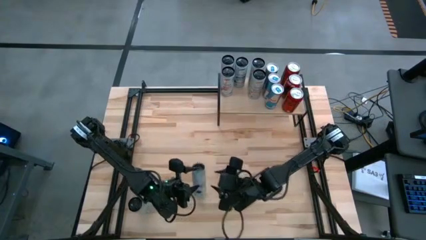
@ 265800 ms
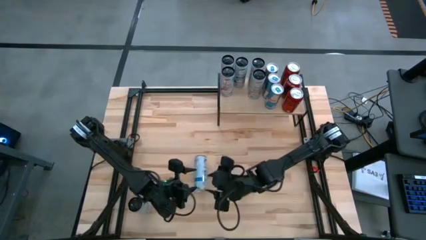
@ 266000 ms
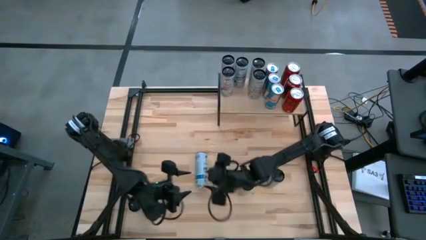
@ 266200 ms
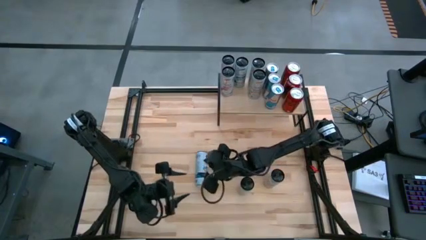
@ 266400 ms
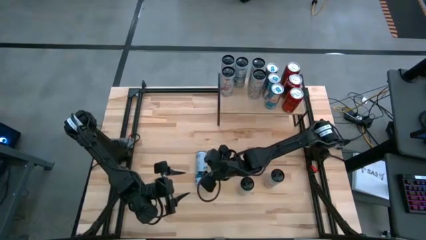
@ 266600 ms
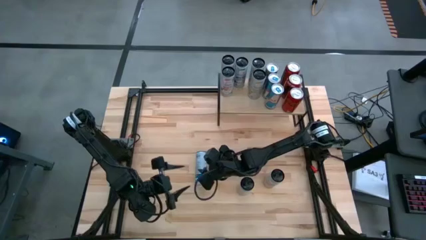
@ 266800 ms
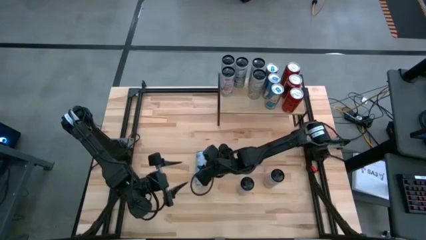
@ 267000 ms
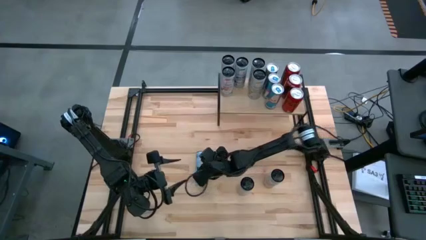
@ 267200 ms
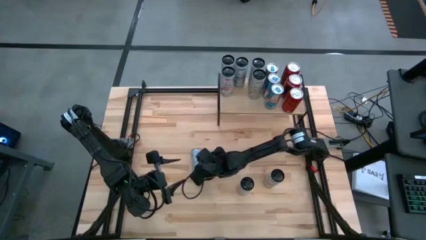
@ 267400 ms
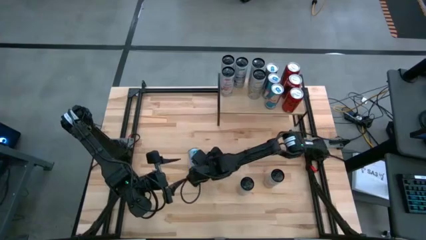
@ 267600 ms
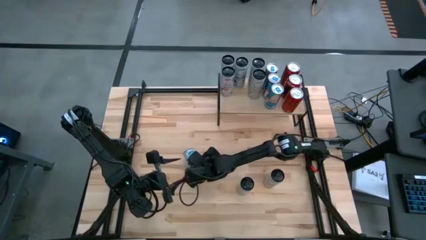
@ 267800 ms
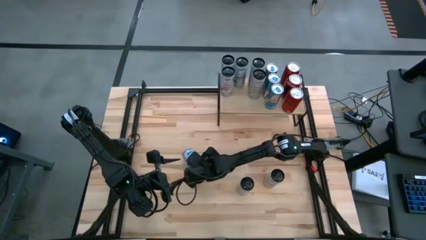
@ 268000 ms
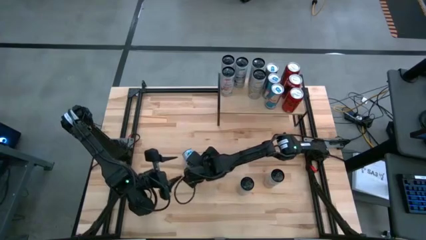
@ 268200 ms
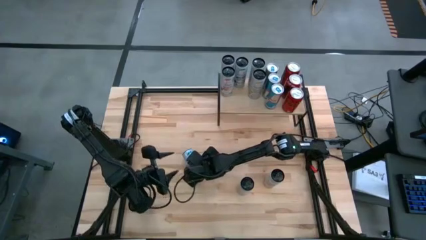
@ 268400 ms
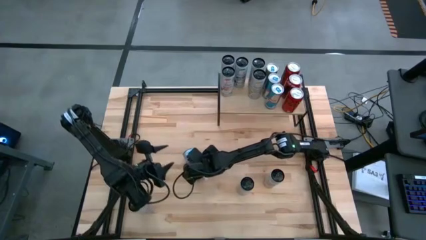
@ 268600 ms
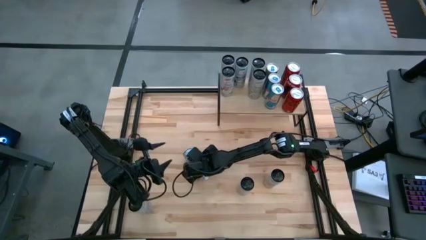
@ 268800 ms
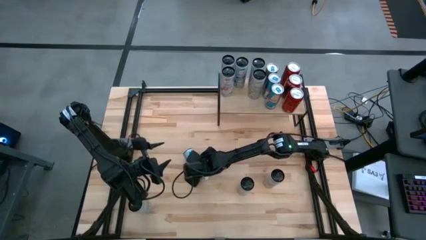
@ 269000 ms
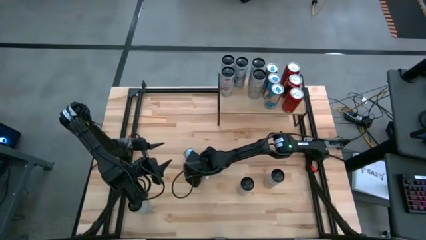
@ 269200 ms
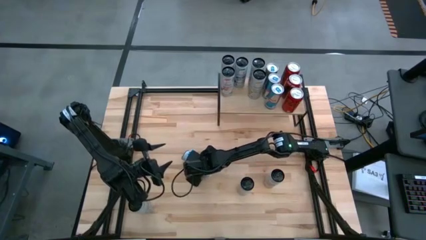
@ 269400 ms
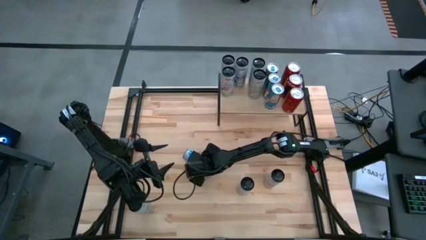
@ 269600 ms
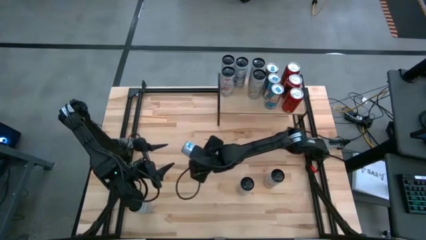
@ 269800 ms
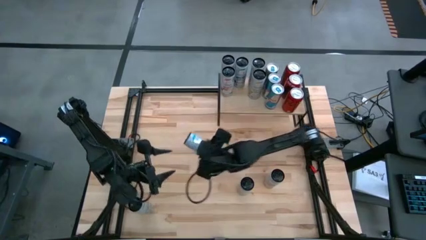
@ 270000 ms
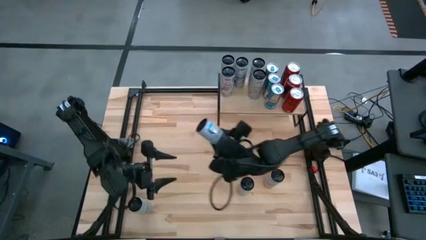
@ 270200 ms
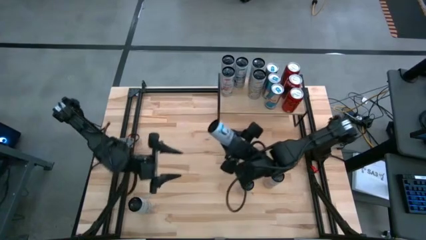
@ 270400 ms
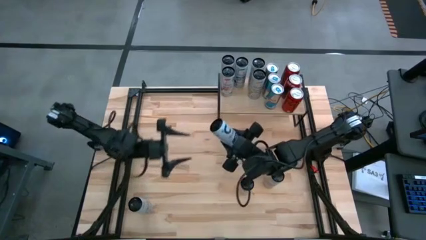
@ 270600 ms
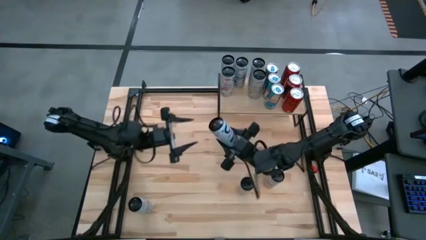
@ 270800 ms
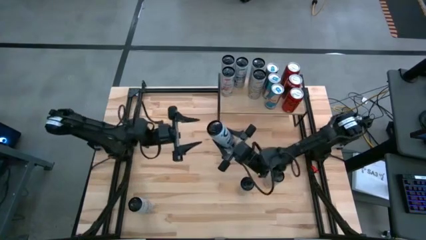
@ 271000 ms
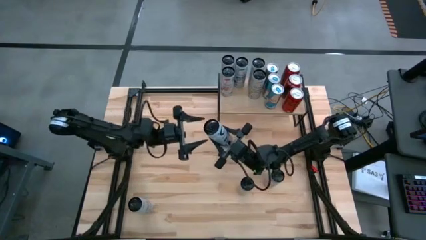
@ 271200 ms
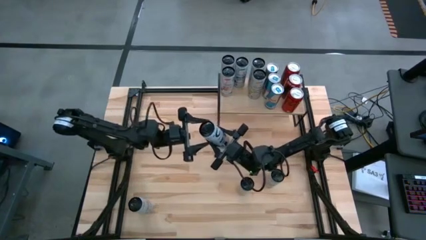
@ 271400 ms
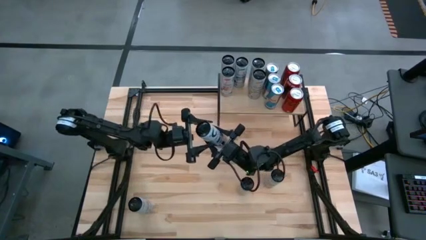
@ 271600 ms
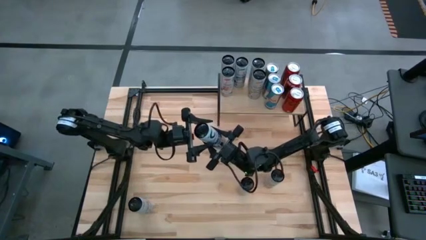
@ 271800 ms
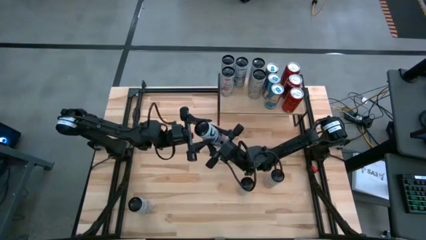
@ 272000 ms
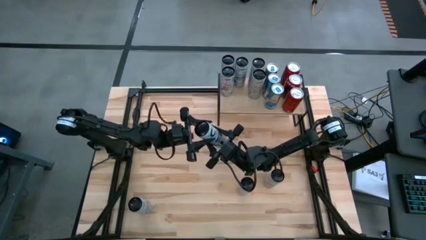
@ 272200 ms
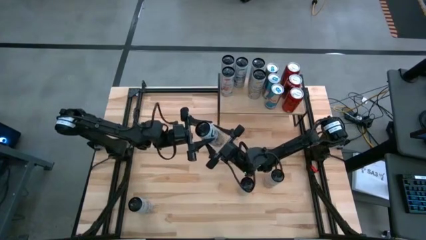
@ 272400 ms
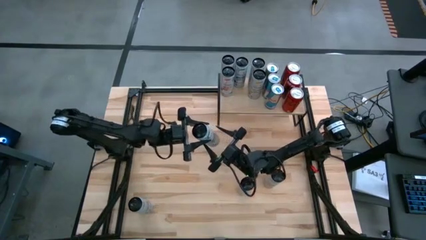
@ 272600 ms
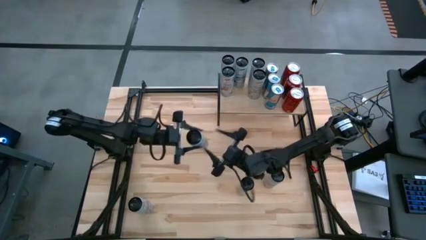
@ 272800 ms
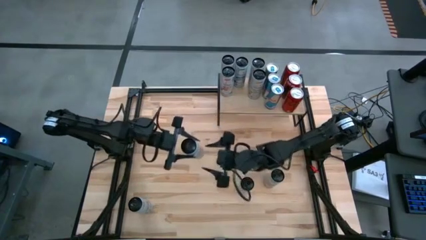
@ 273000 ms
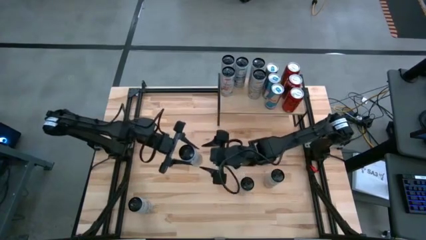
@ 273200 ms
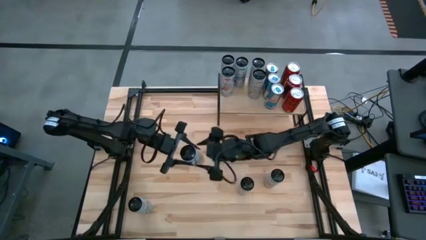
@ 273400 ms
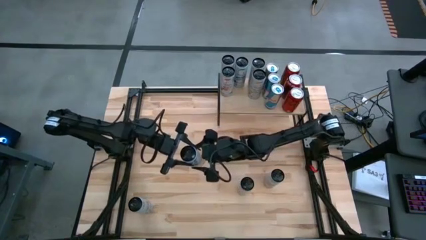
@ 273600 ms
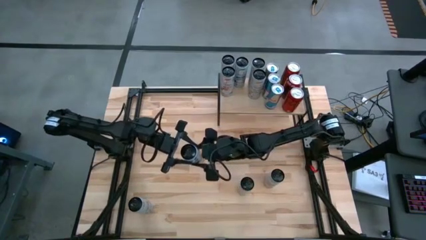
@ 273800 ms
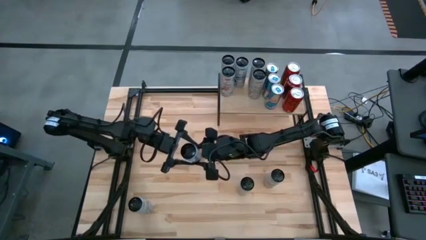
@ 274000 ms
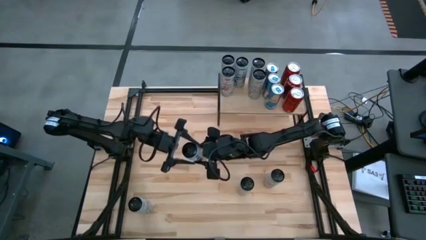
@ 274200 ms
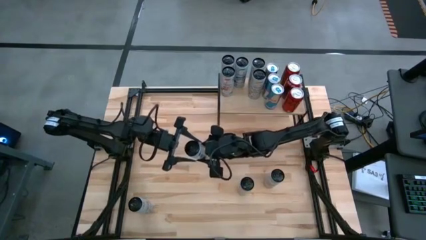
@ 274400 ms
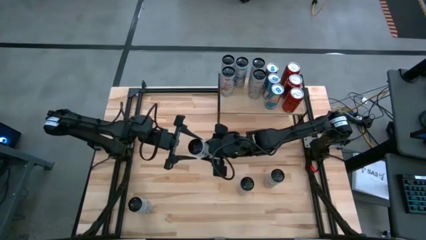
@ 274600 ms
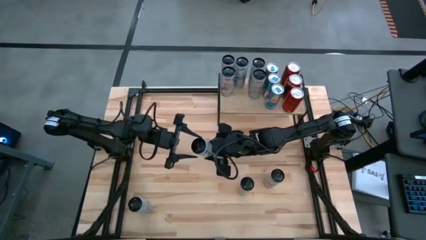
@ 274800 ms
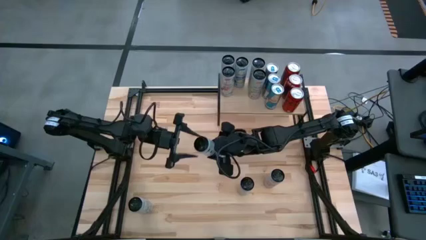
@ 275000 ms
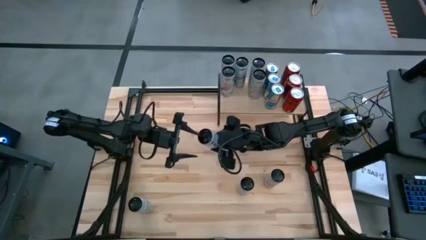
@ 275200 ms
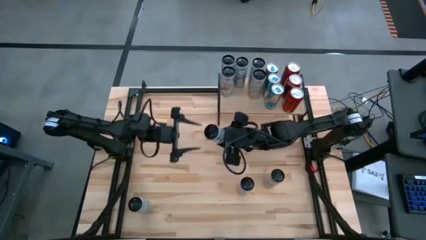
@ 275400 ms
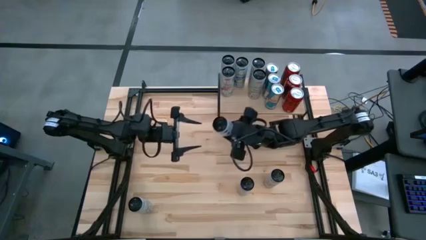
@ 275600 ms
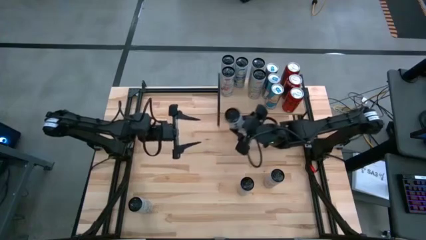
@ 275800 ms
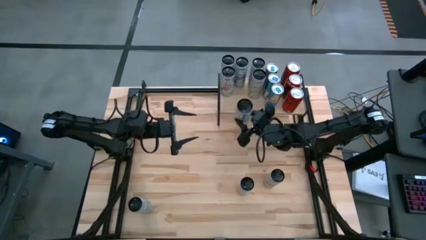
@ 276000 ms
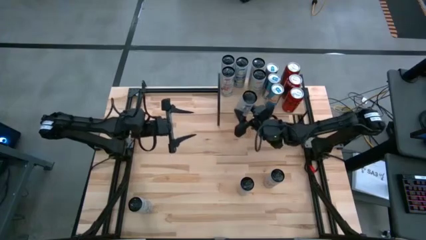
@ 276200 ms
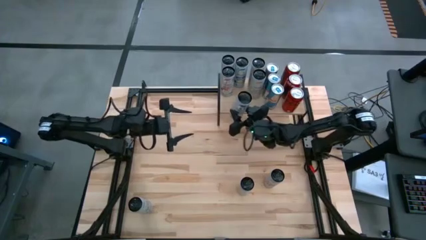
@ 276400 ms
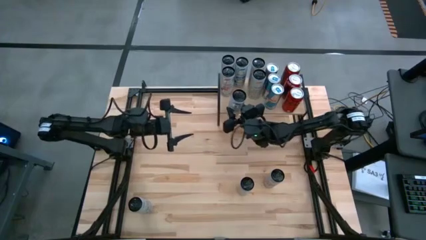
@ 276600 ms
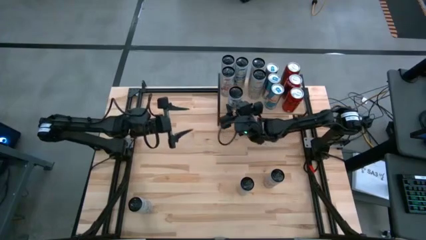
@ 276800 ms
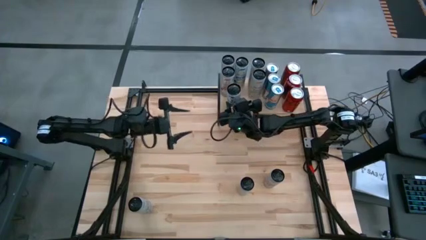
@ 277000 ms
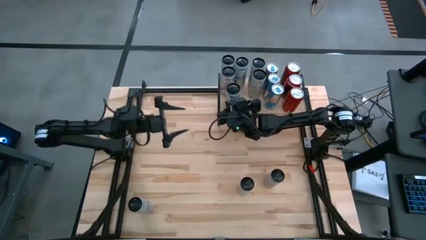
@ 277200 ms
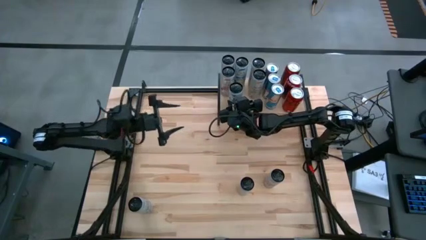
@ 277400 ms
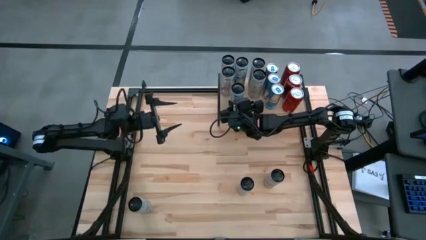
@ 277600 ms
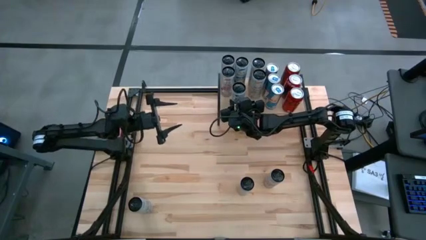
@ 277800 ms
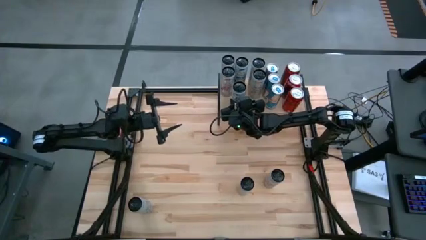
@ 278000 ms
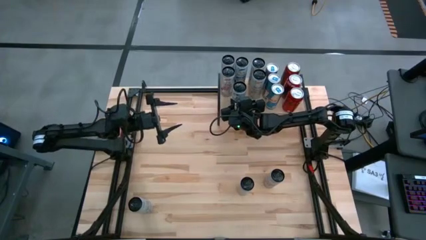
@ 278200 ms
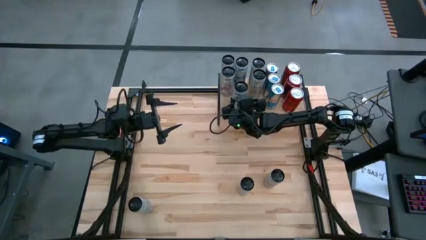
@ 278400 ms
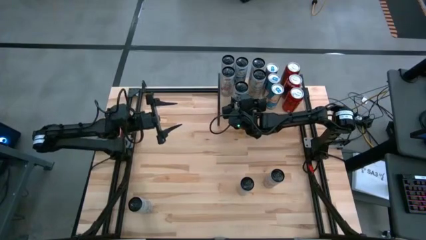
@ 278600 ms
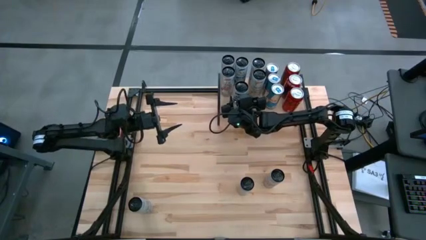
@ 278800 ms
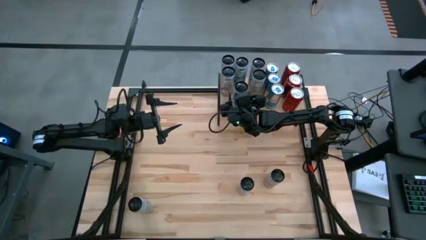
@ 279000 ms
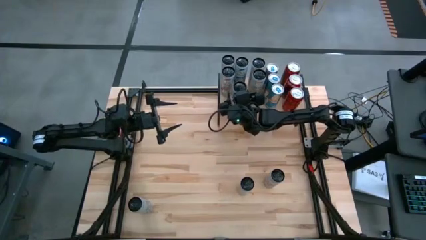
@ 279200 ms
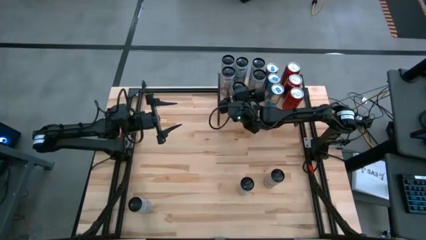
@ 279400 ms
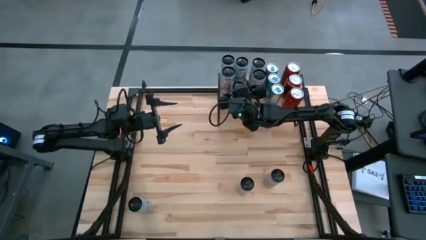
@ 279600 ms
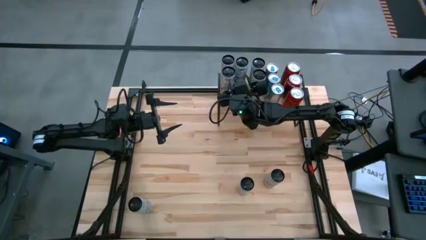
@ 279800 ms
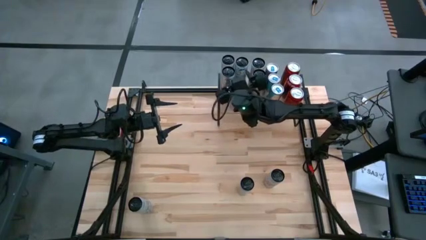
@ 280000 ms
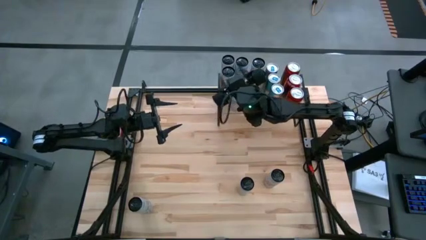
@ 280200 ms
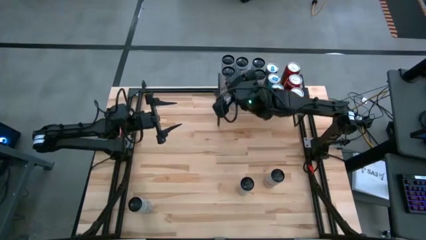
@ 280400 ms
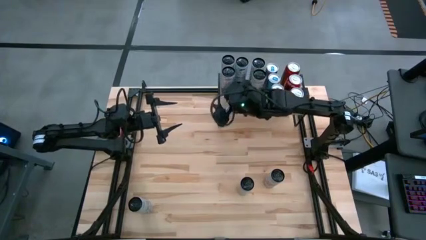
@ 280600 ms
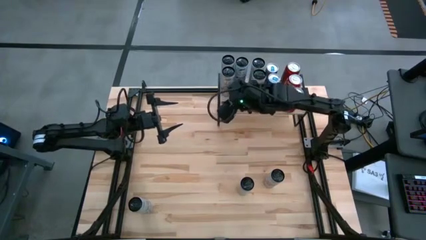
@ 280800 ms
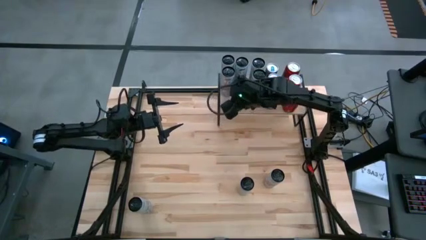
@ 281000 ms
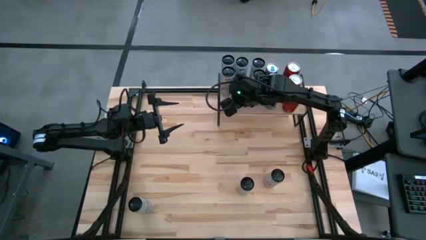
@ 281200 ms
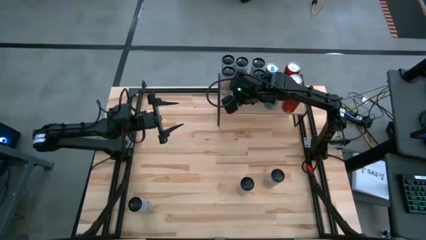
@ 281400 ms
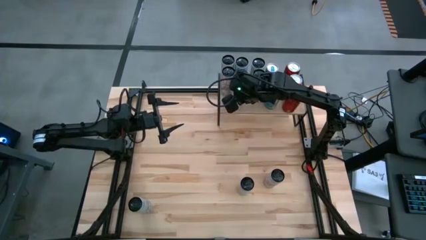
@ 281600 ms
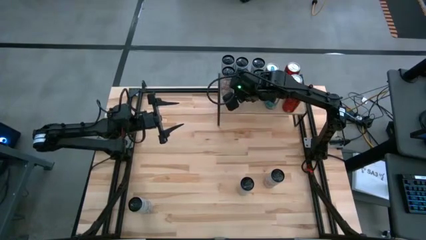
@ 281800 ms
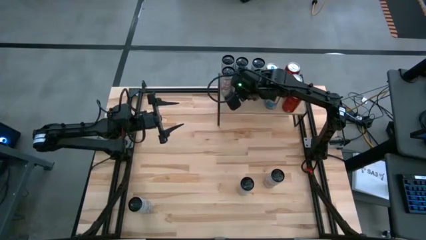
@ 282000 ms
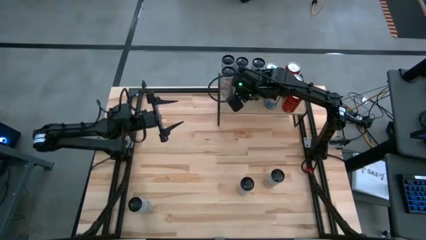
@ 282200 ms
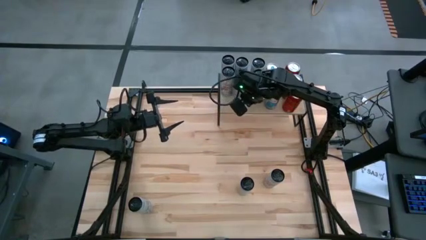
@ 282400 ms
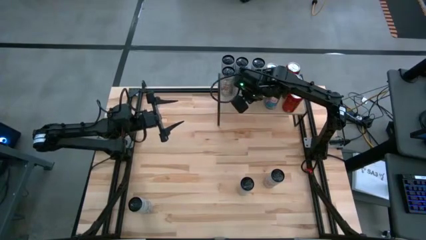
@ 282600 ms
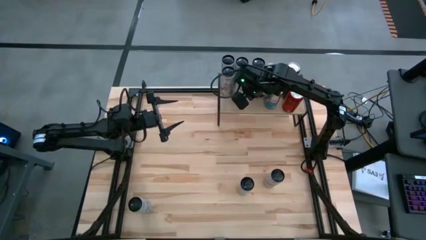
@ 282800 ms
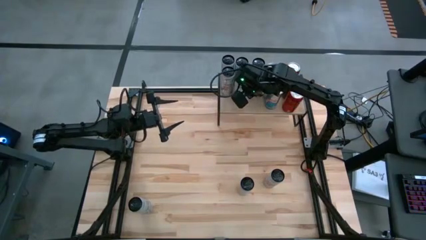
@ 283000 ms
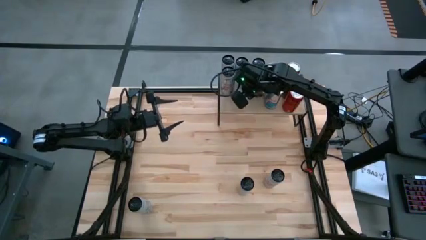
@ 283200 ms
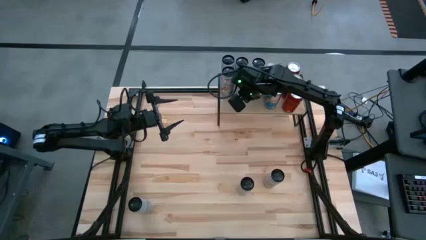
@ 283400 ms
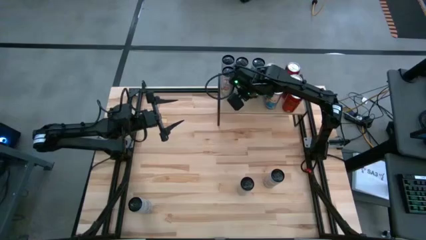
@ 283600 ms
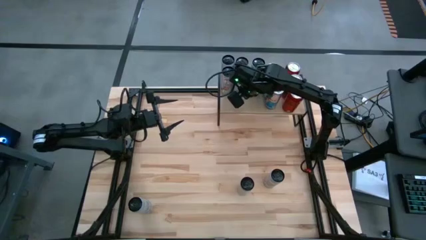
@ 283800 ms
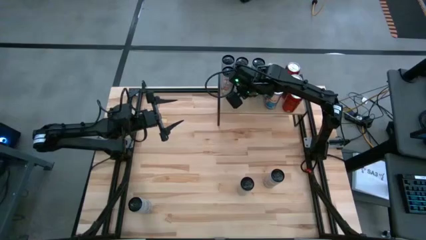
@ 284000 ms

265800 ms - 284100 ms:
Task: Place canned beverage on shelf
Put the top white blue soda can on the shelf aligned with the other white blue soda can
